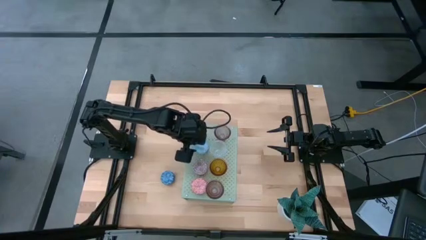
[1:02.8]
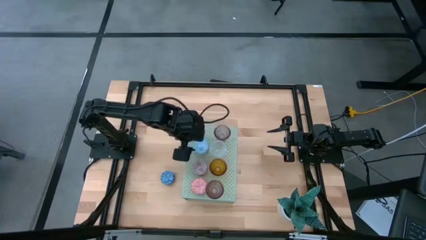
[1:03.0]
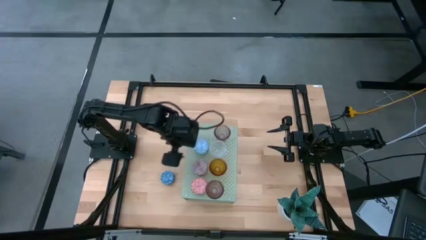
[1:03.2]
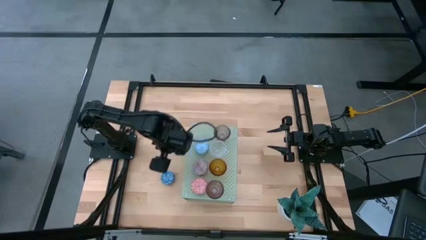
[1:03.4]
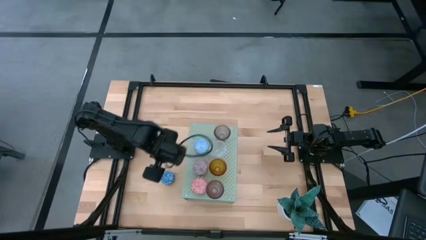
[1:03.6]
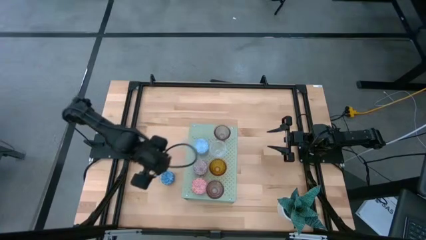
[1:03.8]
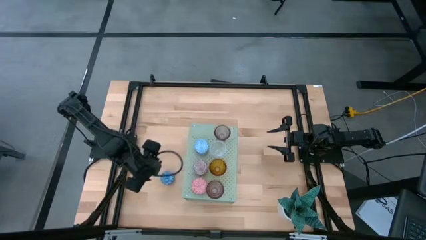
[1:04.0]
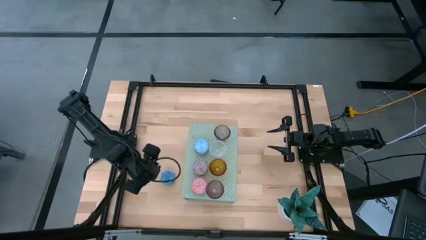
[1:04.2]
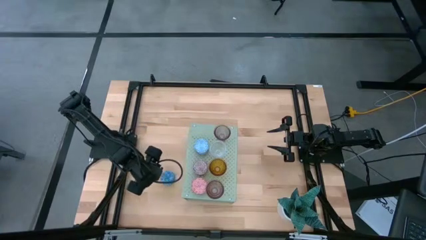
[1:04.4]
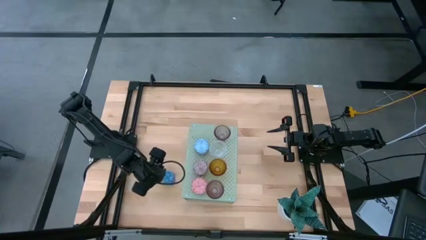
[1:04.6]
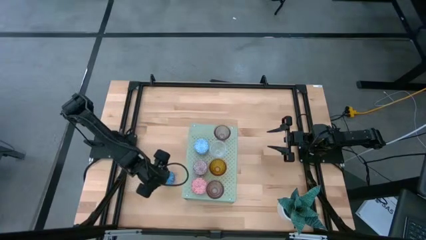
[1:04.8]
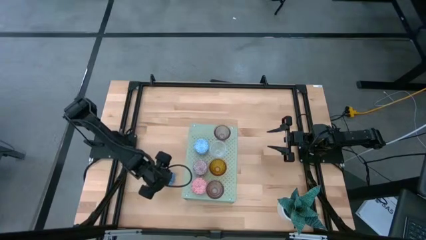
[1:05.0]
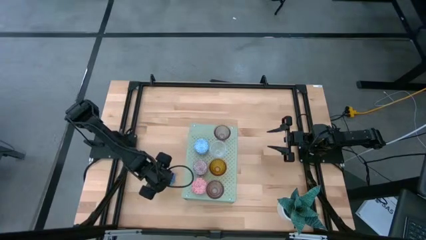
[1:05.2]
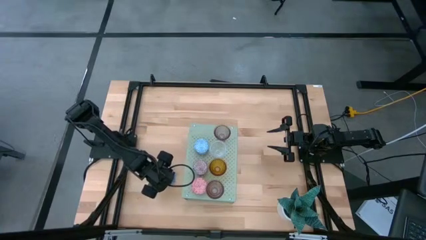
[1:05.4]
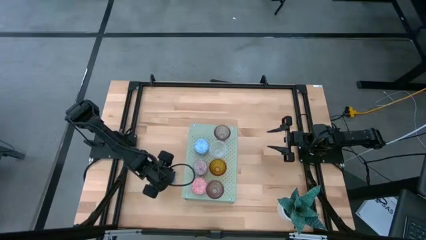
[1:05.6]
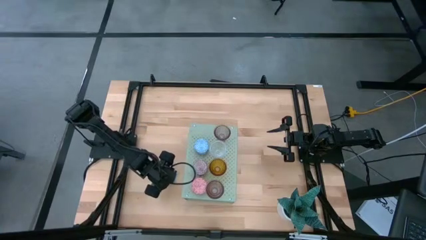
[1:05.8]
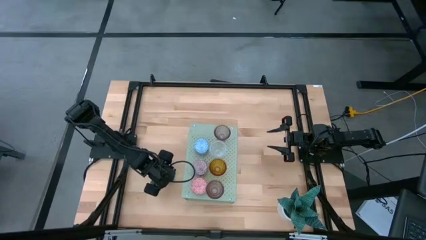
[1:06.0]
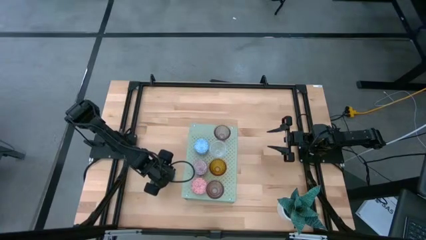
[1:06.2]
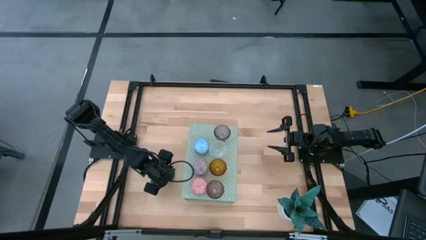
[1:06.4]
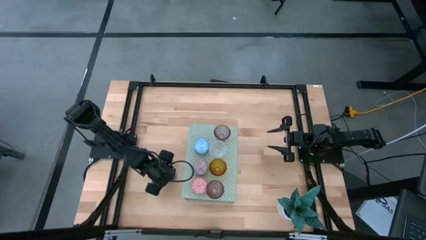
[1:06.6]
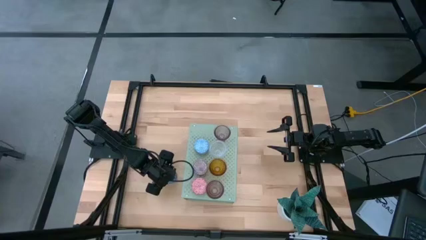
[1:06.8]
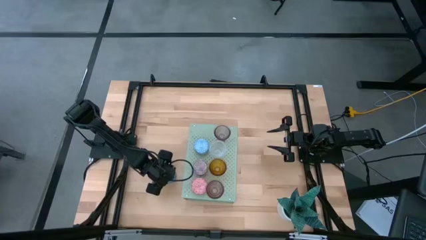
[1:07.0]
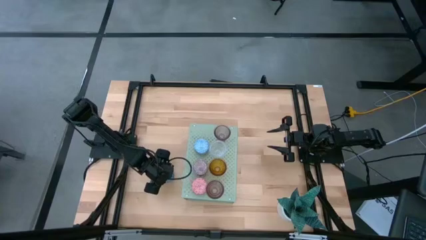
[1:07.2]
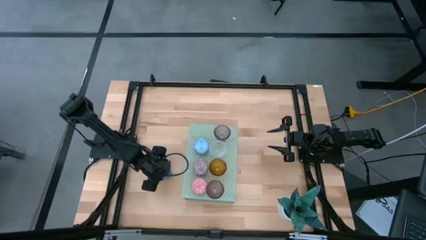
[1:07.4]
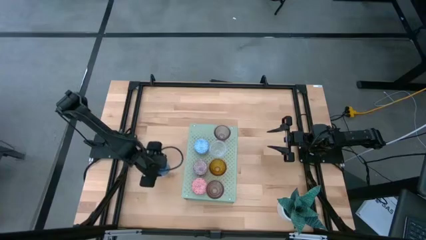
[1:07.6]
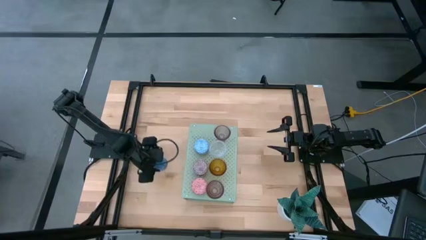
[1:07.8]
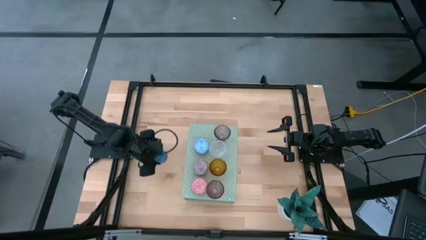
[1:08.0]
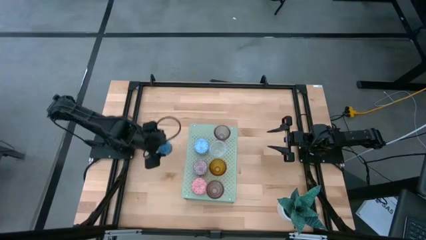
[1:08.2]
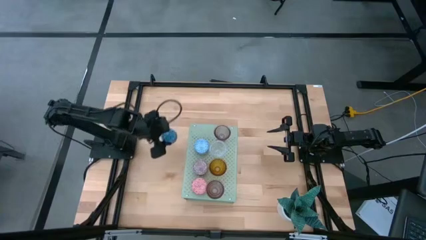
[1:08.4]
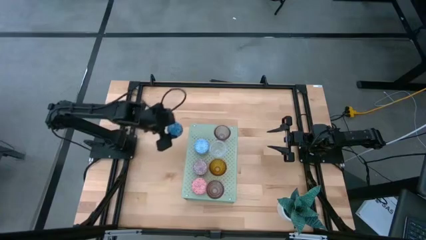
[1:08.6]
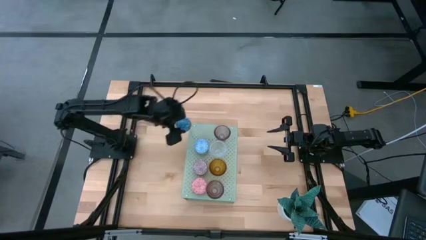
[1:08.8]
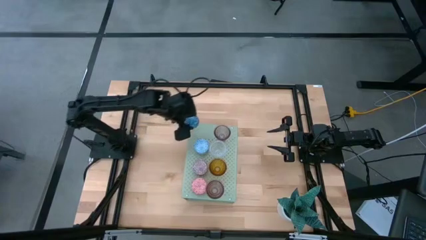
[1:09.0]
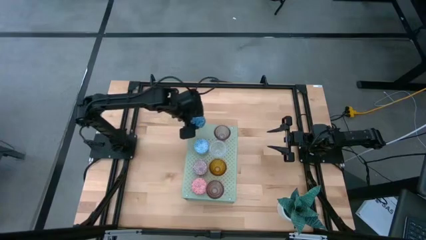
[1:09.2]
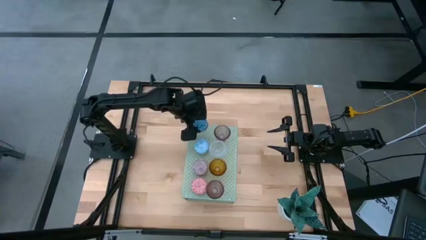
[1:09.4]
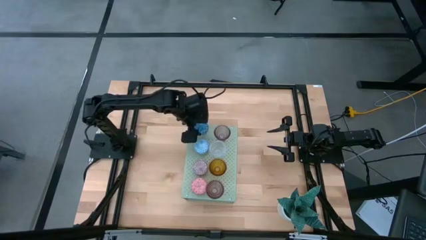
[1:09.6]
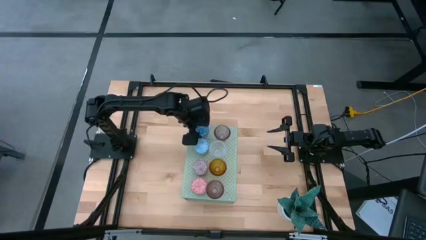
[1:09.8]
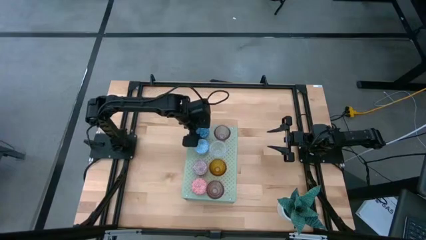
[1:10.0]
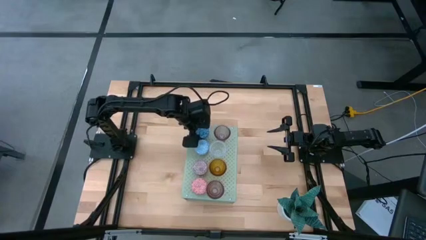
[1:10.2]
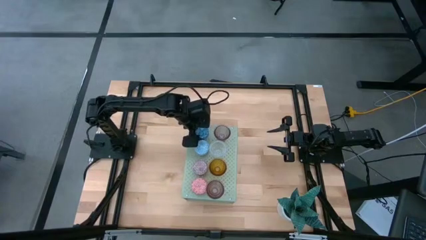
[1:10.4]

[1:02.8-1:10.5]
Task: Pick & Place candle stick holders
Put the blue patterned scented candle on the shelf

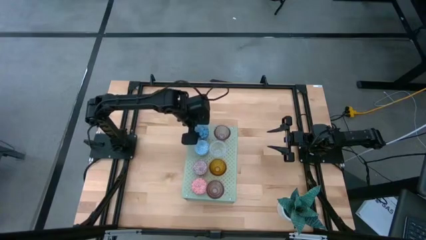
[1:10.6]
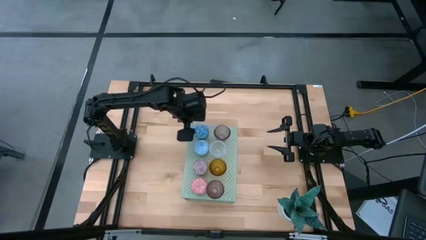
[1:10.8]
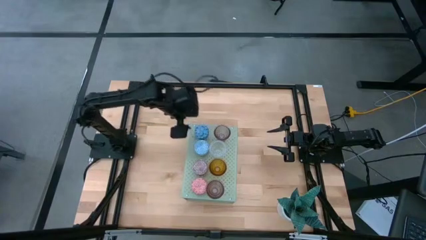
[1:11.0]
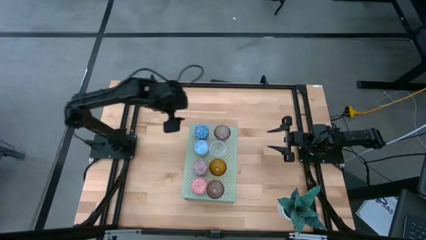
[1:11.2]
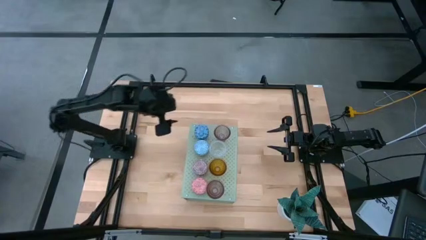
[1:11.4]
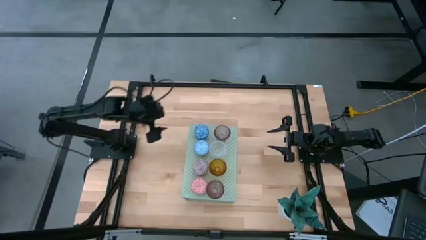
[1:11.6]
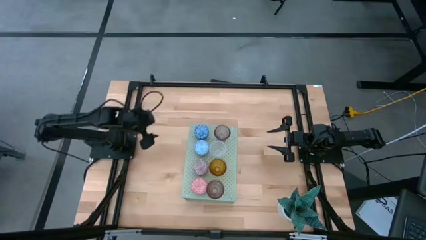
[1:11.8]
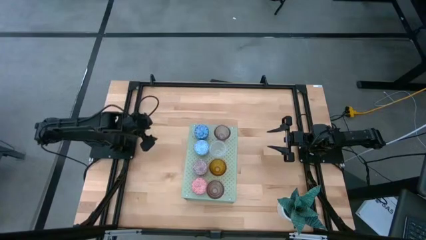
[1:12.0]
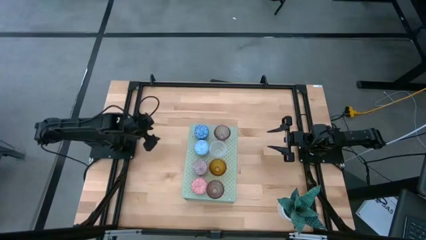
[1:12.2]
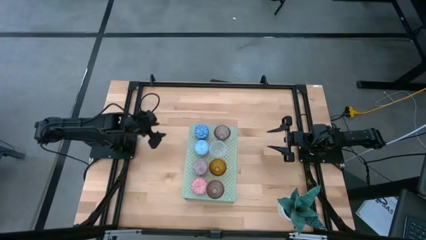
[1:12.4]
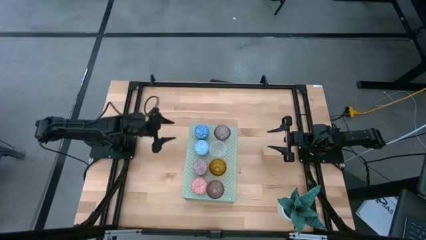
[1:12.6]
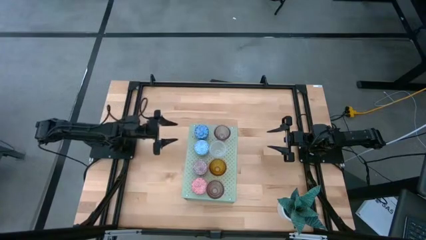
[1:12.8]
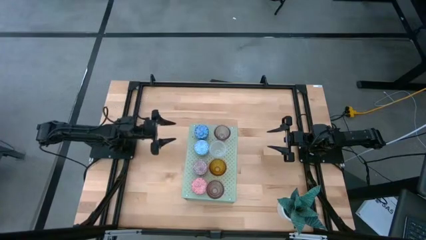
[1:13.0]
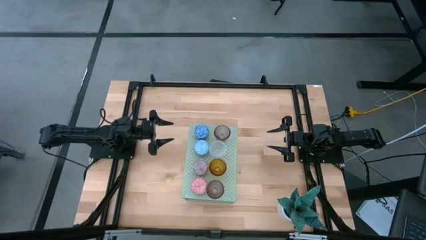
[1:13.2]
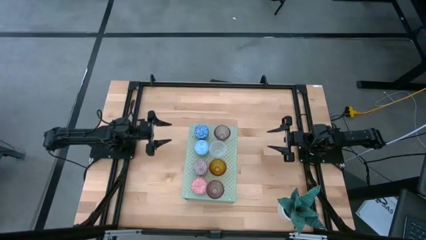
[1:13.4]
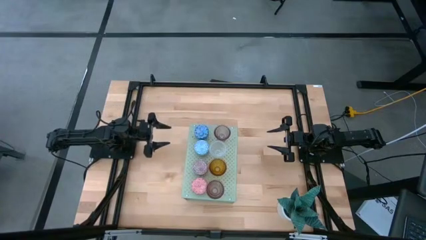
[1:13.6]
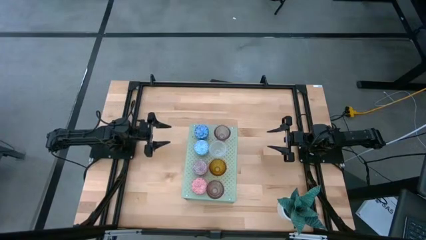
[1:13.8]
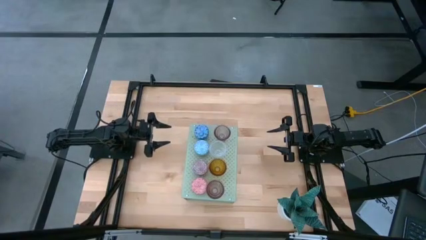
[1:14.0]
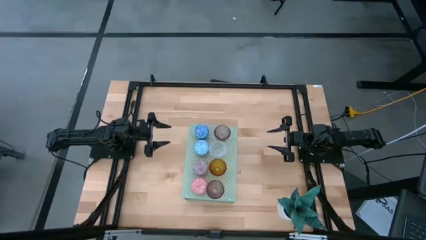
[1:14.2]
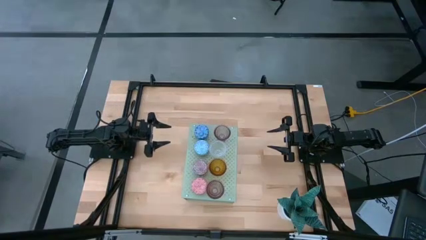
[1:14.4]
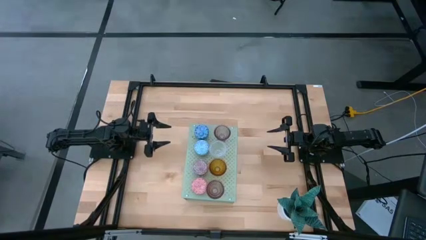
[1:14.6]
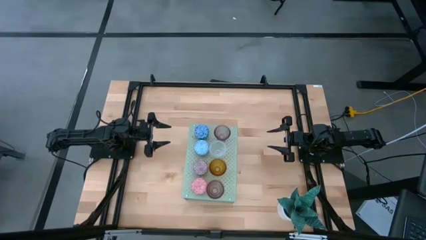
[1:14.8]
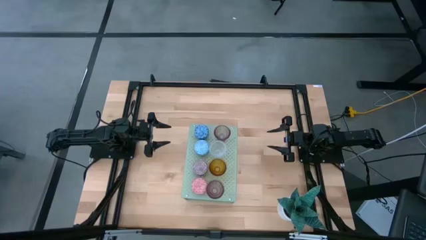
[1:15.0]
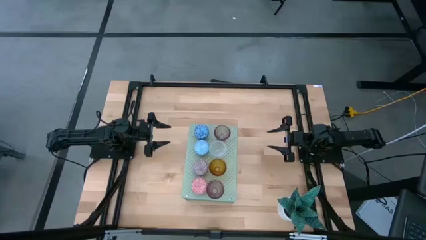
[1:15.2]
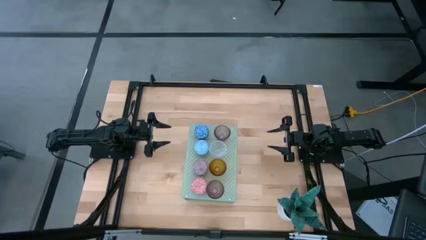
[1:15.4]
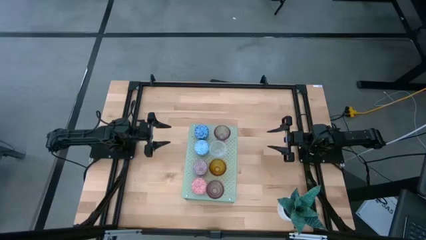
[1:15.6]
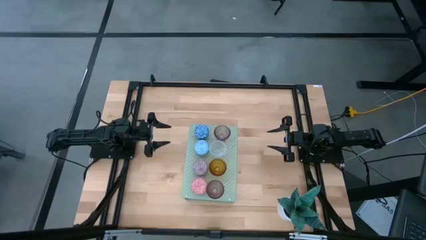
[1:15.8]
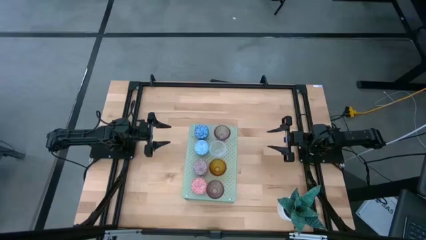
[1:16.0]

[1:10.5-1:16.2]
Return to Home Position

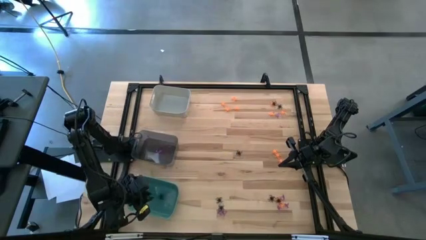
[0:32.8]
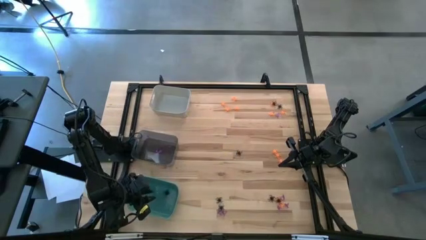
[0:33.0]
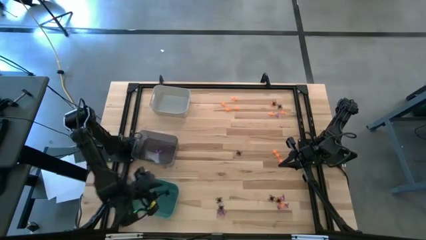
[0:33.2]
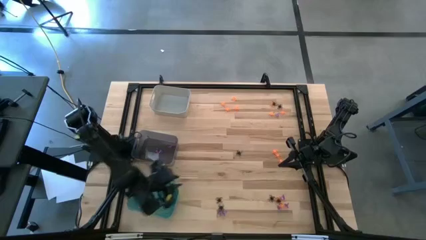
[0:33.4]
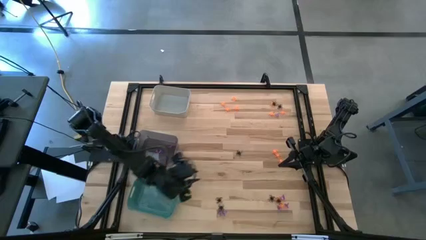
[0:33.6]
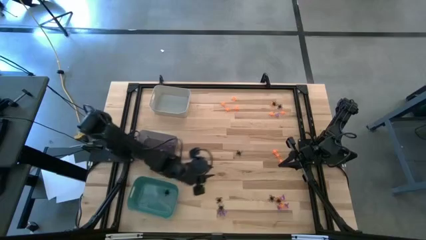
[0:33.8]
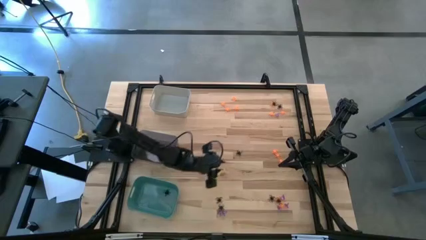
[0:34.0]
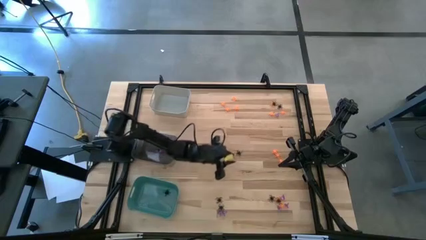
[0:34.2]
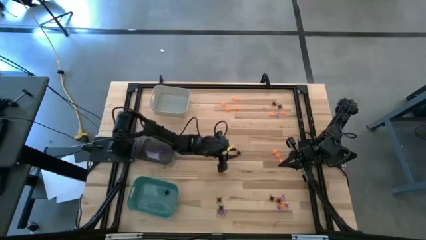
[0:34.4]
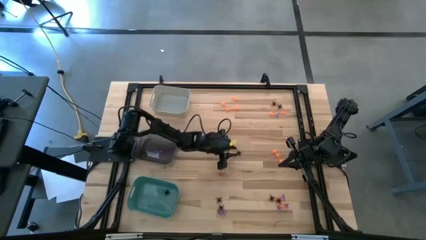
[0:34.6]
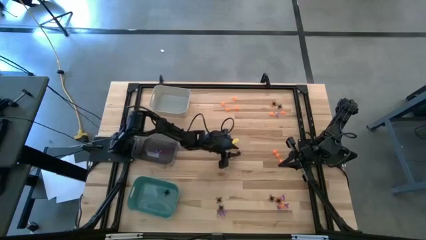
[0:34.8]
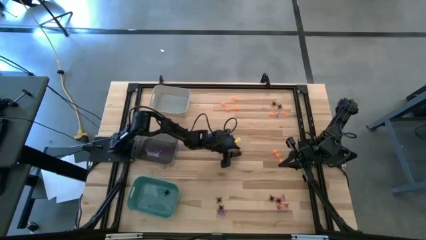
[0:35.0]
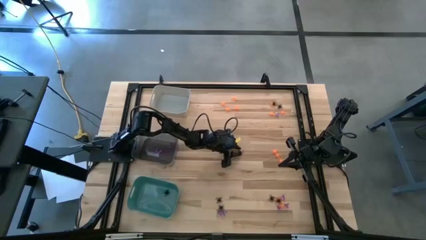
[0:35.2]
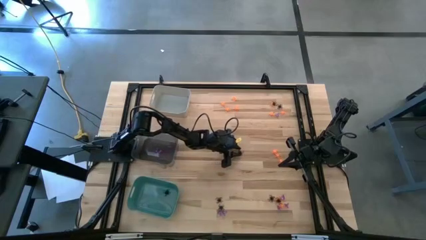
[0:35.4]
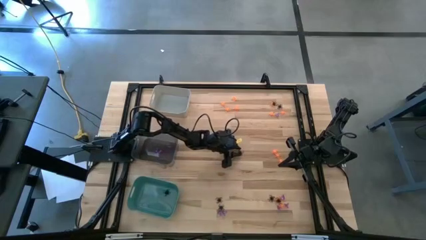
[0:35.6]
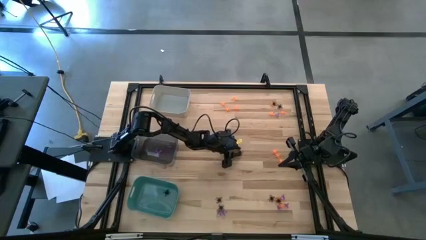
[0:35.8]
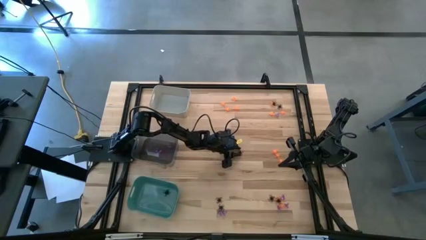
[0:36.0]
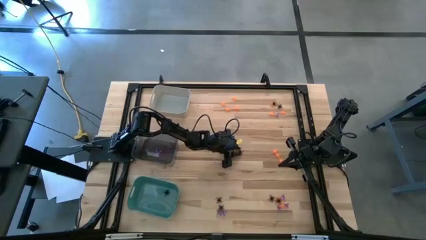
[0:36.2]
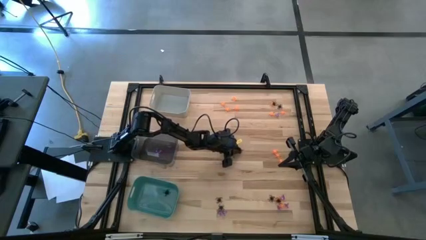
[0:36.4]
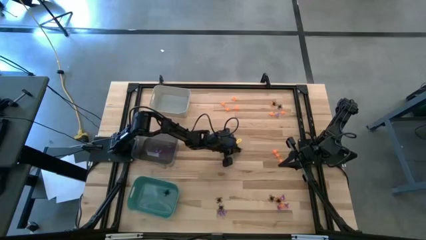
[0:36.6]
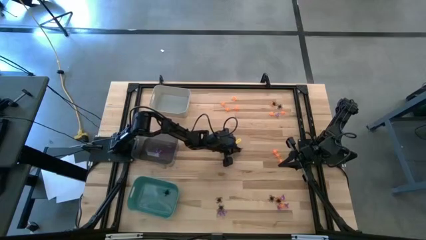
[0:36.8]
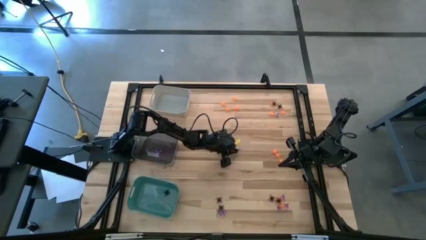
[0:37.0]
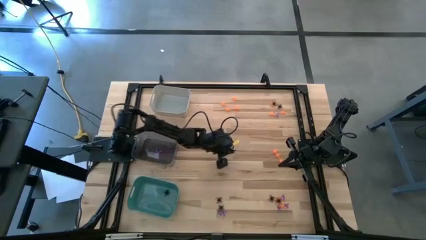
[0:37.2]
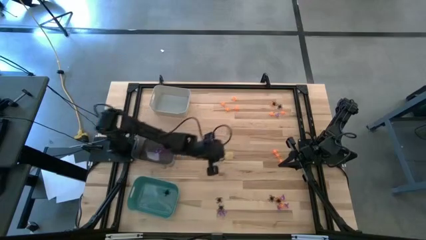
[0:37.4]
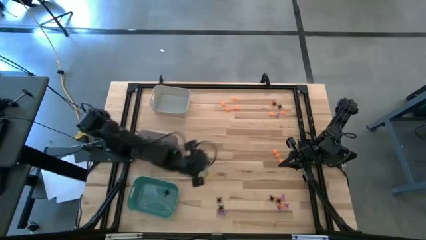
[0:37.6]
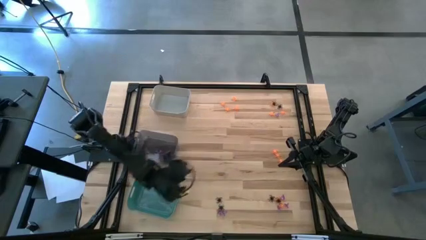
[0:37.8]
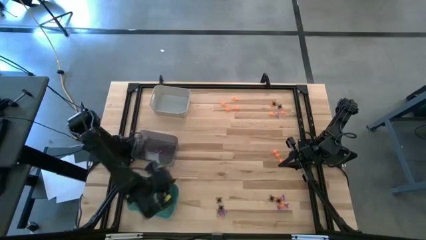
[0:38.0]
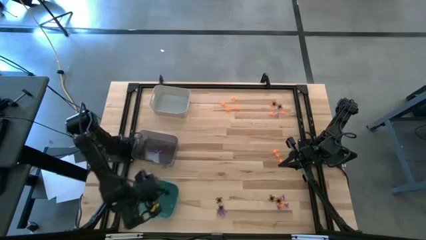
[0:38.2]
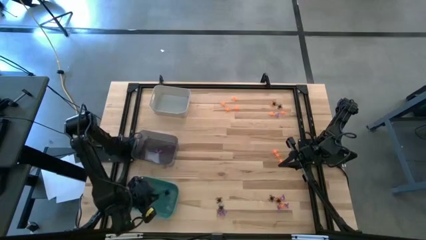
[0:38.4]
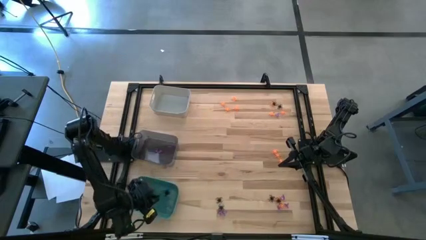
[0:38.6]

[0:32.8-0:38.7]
Task: Sort Halloween decoration
Put the center black spider into the green bin
